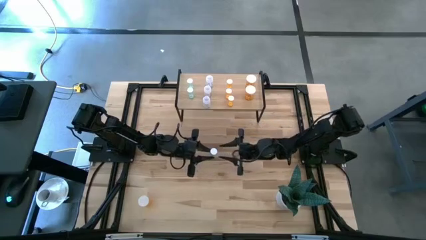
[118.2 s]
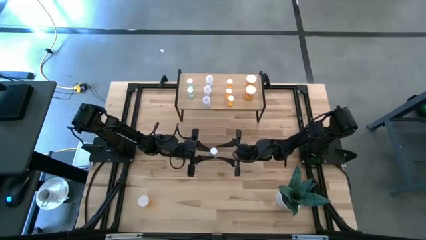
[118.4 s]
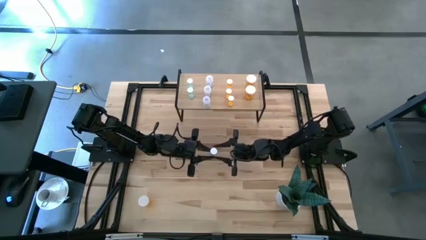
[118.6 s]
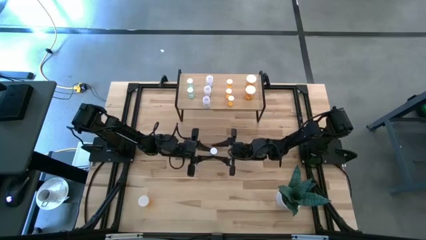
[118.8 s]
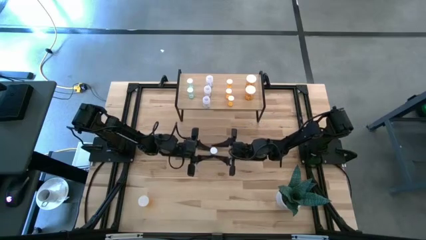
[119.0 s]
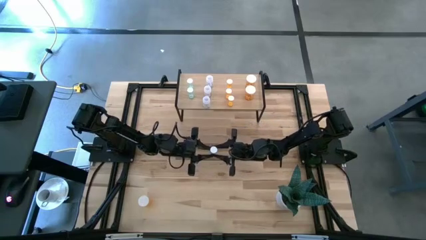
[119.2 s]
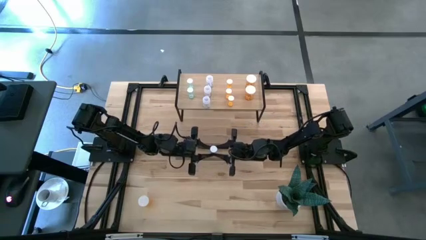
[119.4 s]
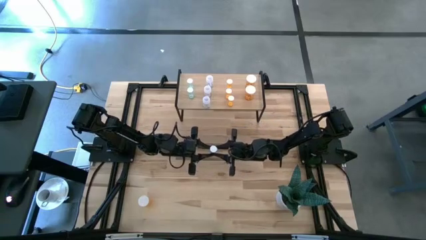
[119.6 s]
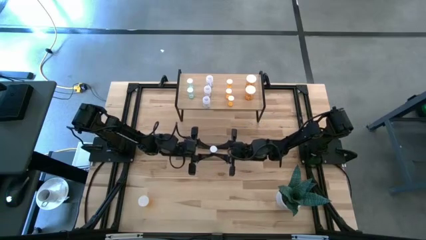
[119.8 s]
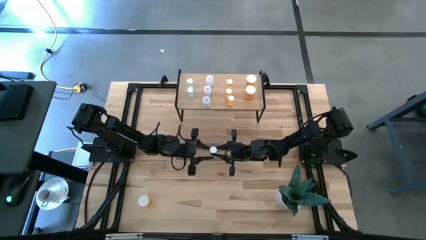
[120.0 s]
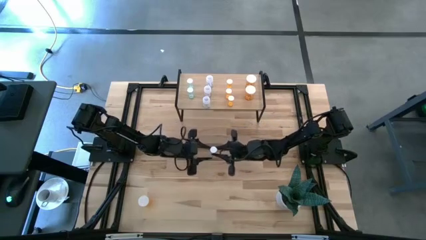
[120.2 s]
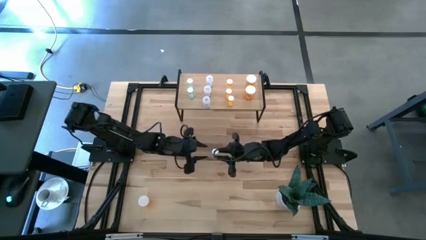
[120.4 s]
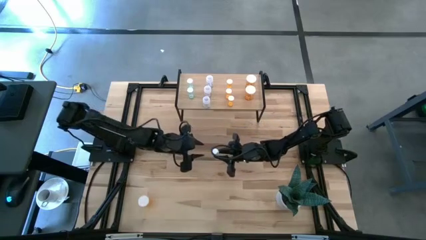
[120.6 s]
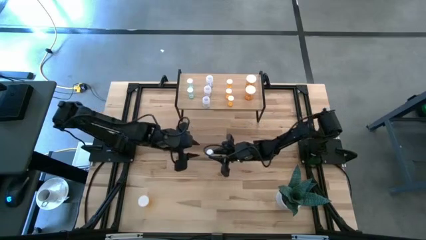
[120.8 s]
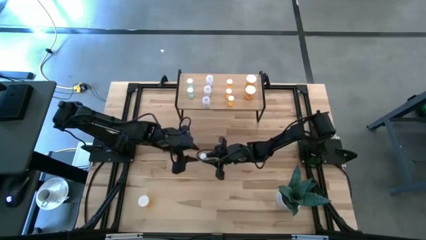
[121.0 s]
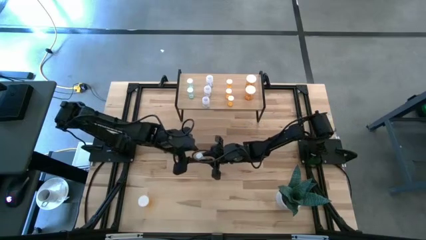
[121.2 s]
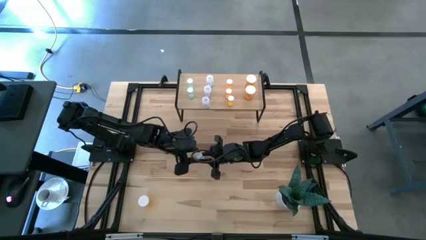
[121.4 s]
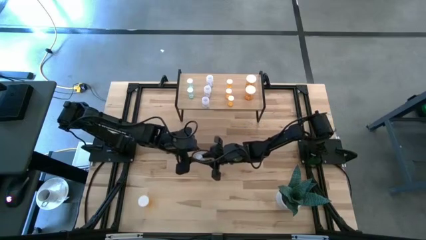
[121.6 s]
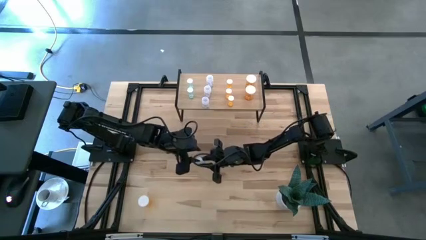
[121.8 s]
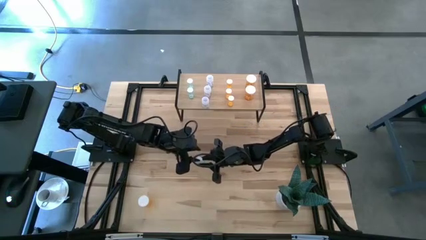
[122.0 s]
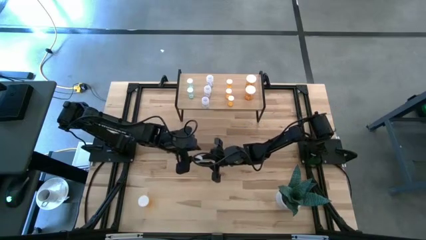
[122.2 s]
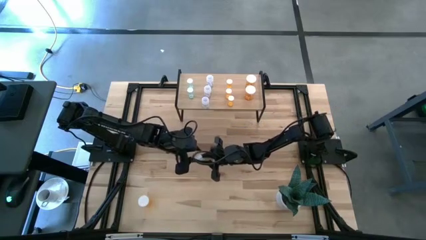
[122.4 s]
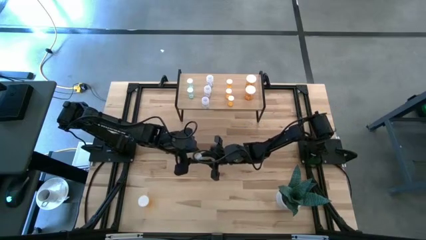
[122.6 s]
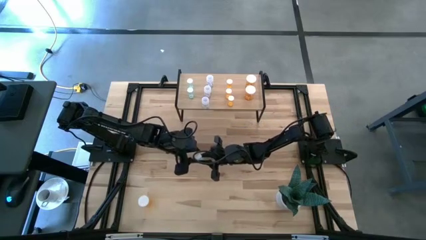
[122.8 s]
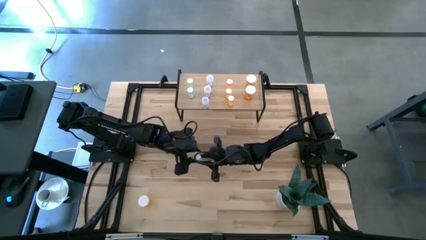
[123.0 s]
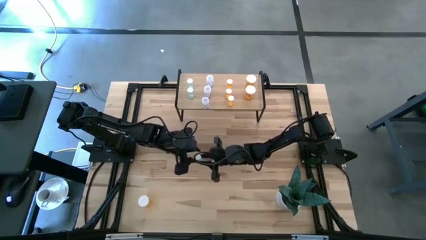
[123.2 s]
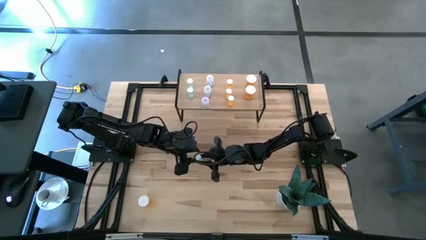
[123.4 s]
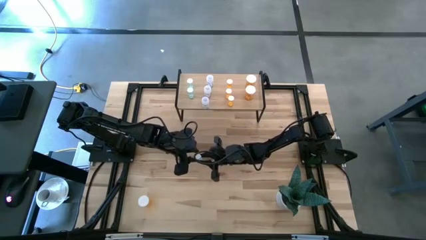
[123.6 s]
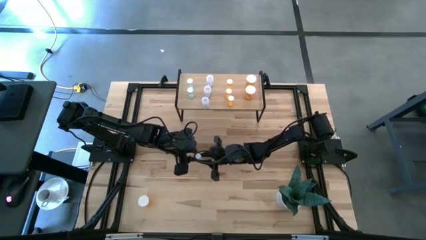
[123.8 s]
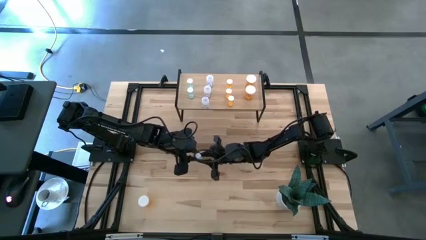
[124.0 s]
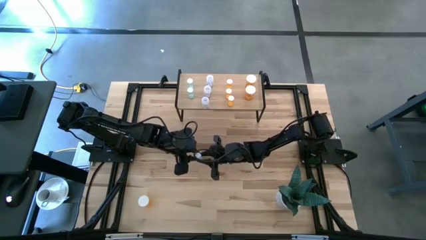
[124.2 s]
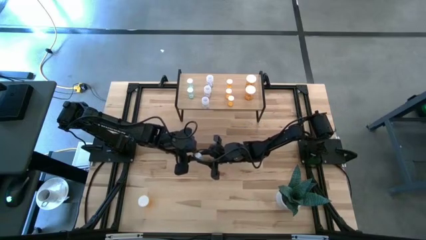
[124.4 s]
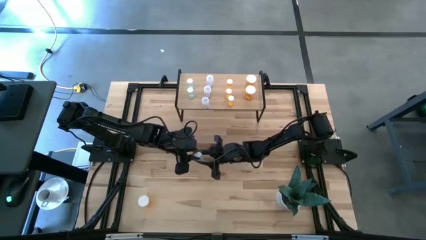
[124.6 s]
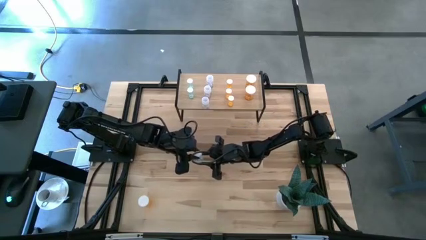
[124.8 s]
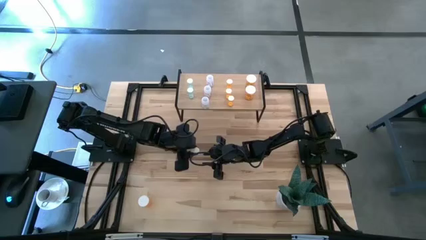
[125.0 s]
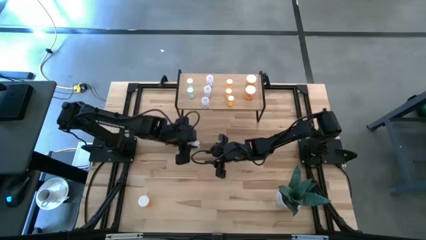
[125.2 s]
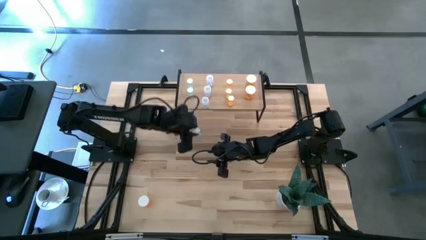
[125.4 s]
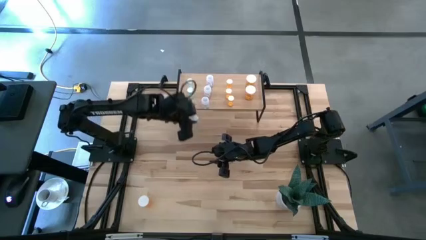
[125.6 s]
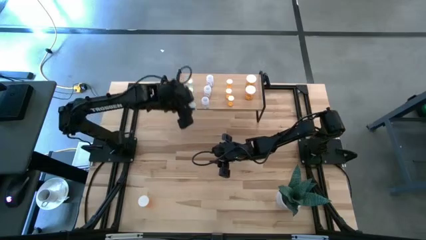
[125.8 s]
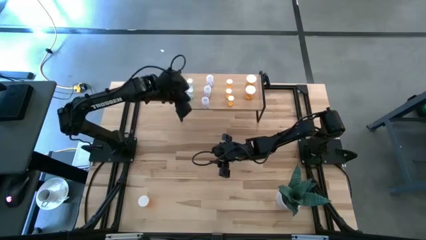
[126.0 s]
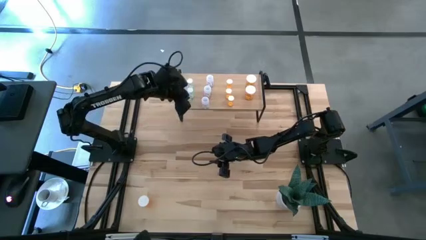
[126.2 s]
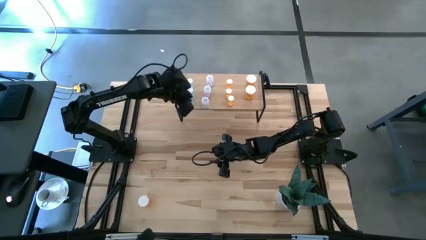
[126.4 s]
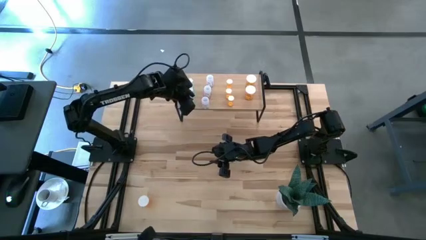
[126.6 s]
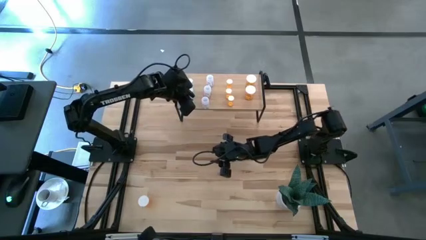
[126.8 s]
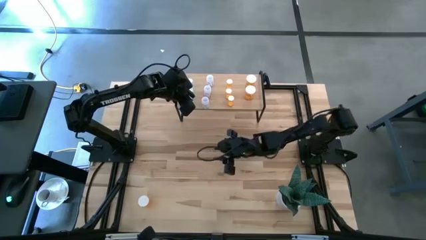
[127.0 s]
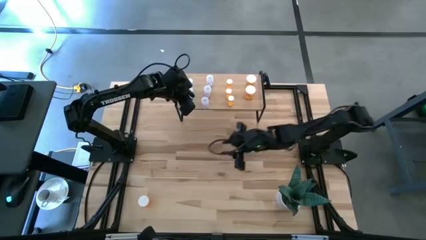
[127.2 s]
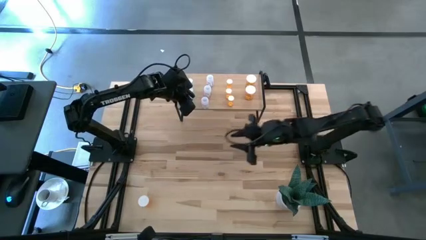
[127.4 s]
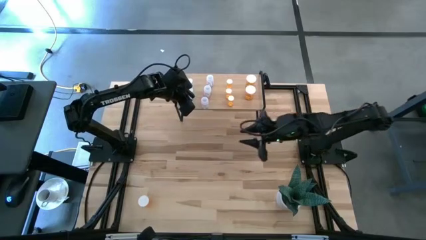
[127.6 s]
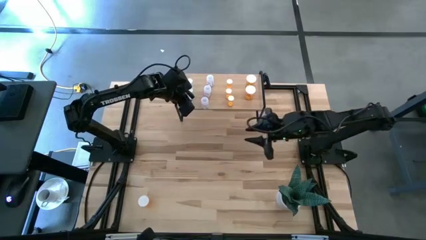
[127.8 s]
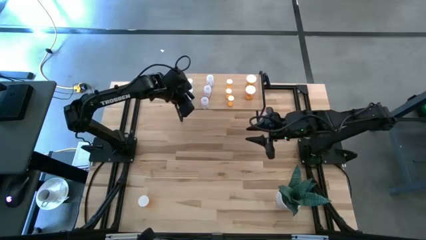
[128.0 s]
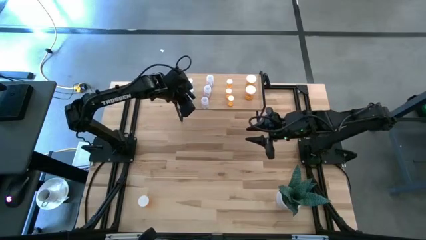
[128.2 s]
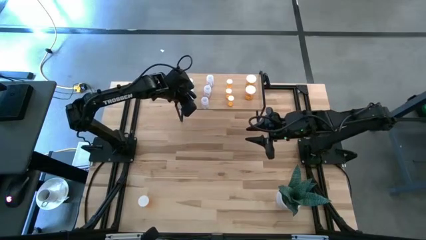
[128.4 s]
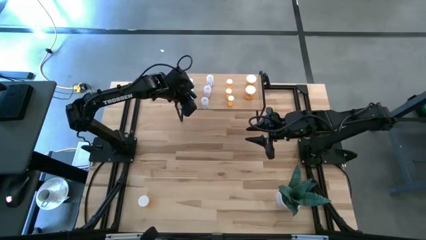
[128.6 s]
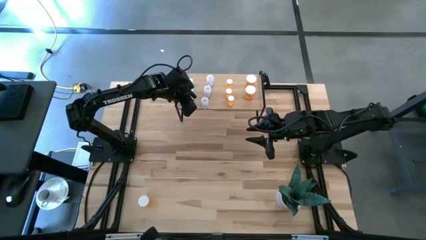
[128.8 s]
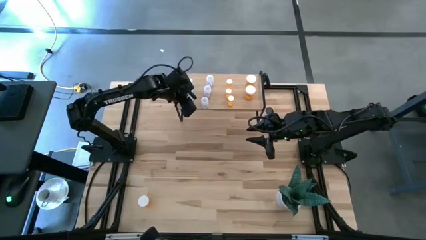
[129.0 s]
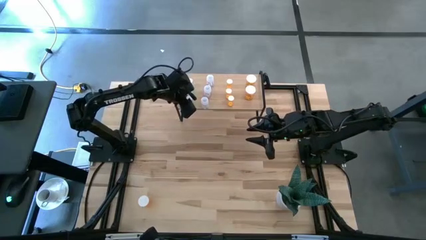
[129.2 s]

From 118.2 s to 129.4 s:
Task: Pick and place medicine bottles onto shelf by color
Put the blue pill bottle on the shelf aligned with the other blue pill bottles

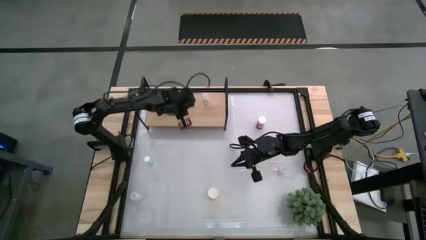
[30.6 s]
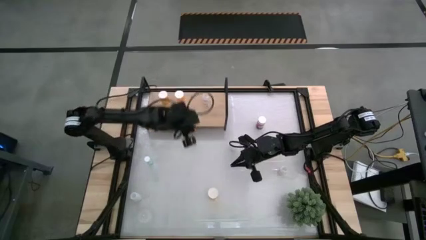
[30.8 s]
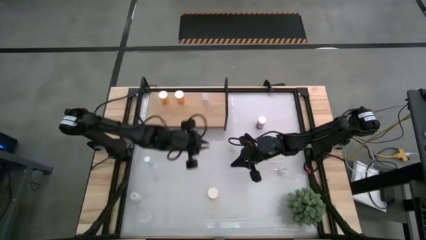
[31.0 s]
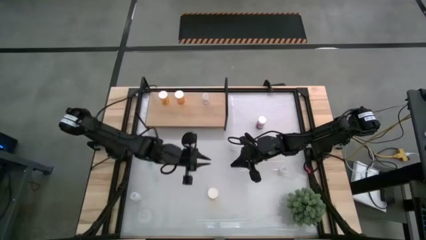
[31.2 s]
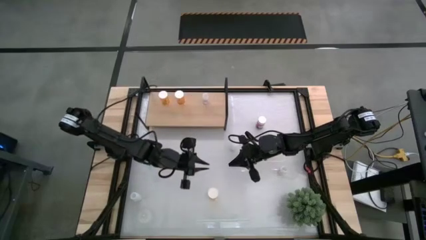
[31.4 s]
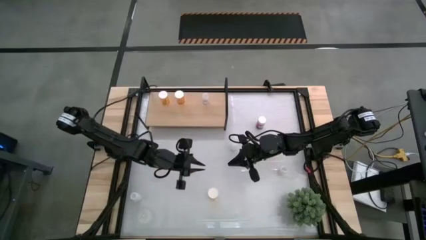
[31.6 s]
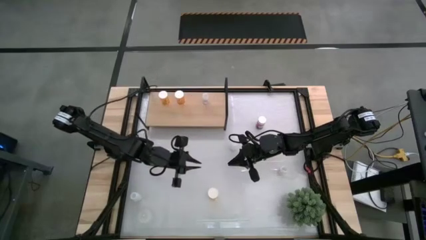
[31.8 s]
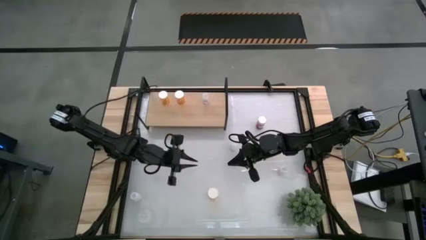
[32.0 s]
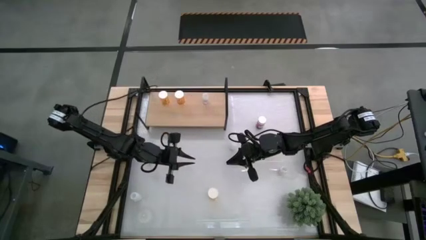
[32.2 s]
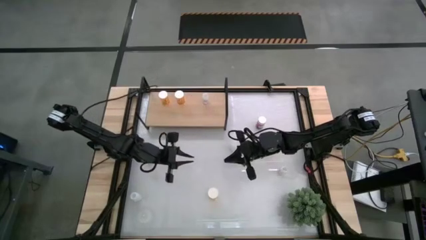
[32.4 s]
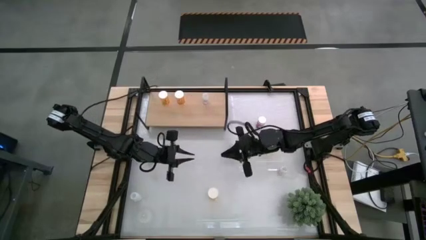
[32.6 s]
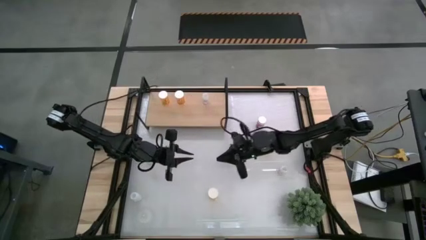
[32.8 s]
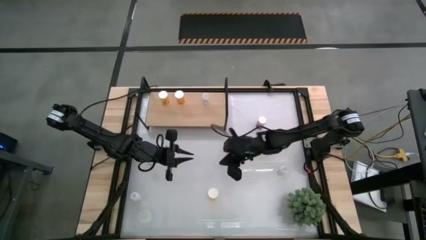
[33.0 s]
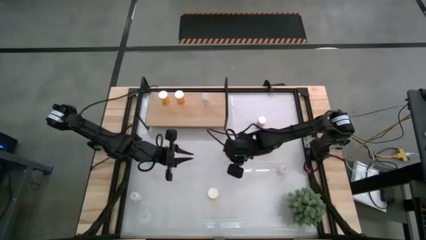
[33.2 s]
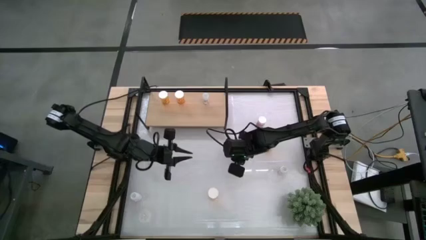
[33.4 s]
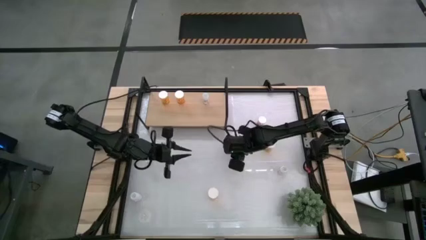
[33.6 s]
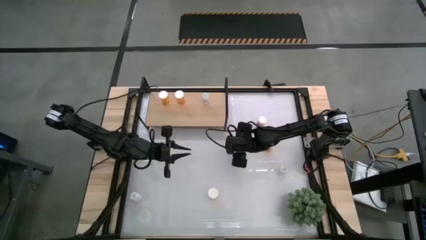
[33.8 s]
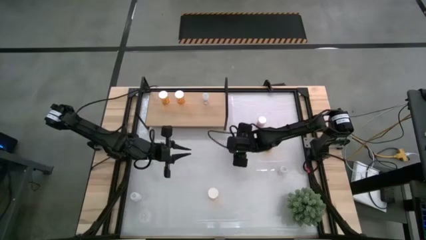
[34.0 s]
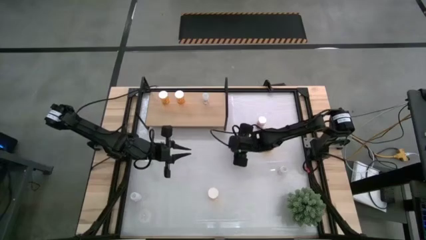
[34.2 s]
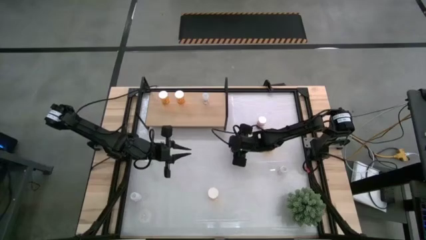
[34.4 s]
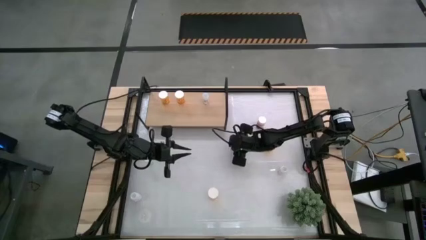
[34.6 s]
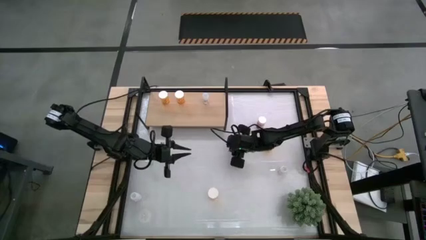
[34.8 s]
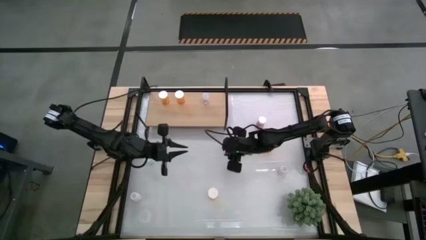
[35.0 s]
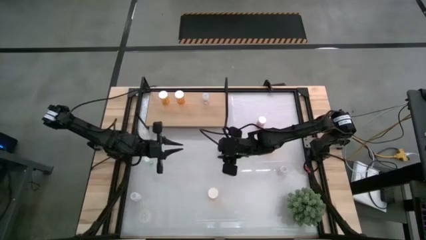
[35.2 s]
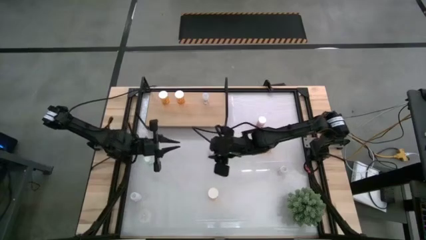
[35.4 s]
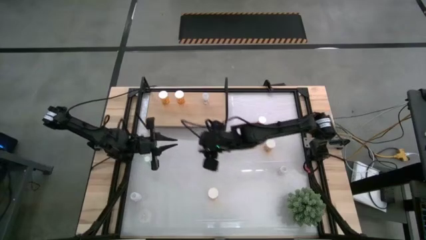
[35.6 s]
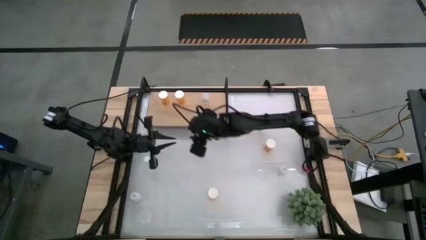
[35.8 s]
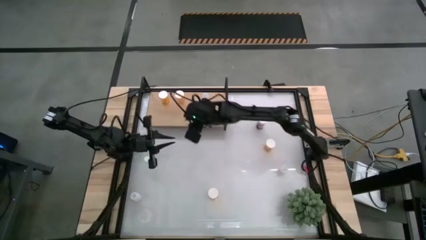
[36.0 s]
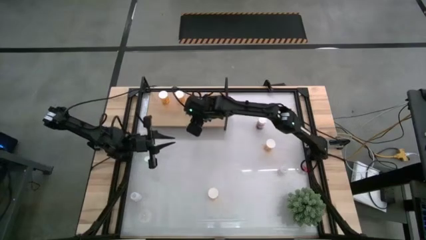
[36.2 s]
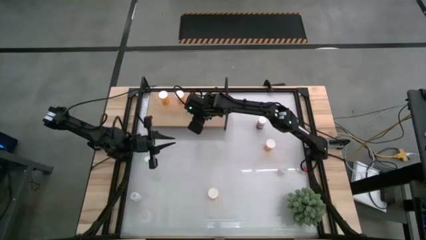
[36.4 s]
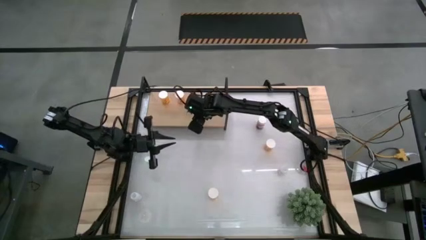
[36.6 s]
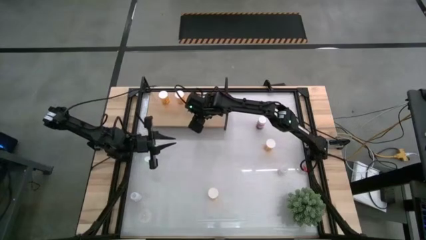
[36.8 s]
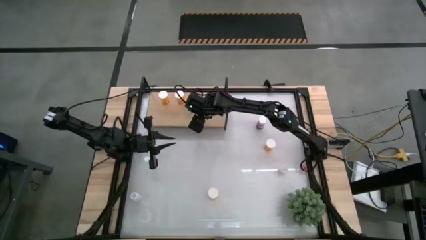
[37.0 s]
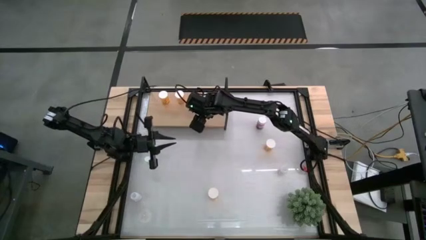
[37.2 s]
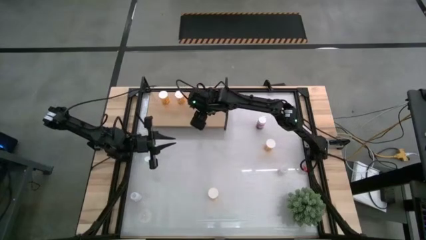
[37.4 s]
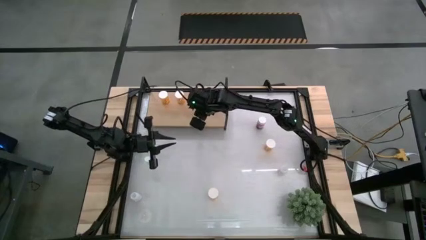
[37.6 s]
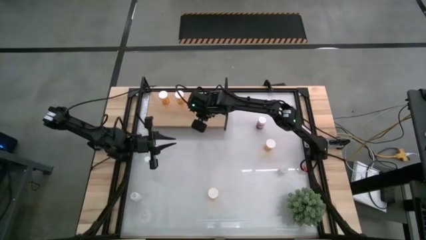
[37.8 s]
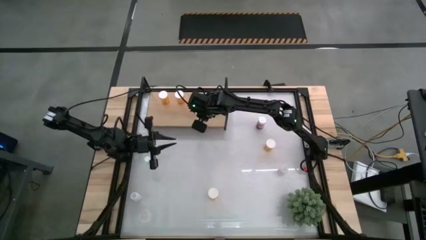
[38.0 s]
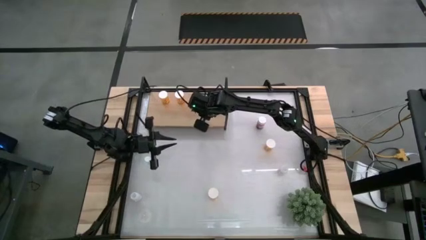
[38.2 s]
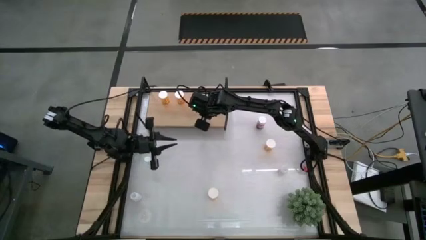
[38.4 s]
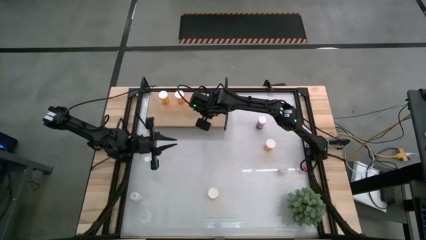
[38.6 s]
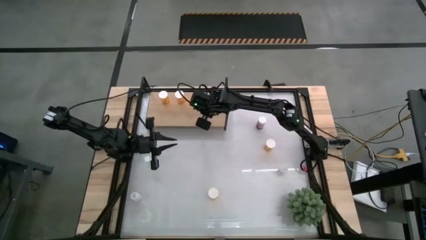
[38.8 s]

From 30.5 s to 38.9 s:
Task: Pick and place medicine bottles onto shelf by color
Put the small transparent pill bottle on the shelf
